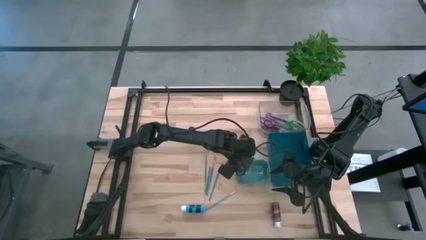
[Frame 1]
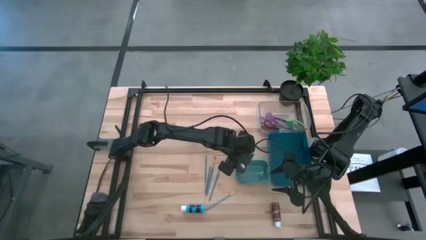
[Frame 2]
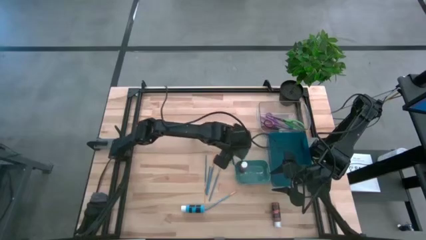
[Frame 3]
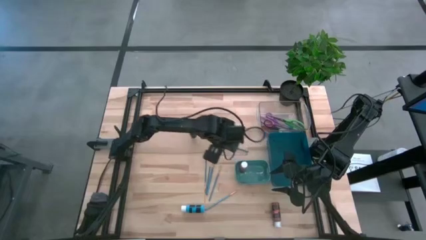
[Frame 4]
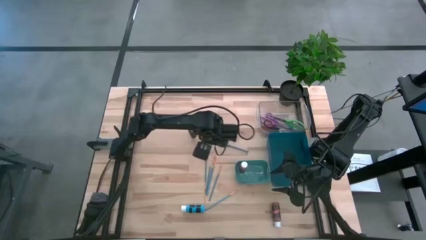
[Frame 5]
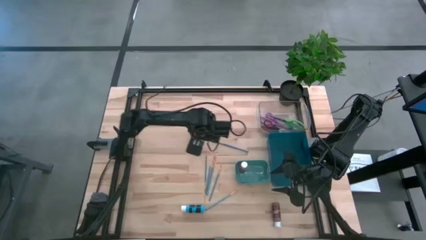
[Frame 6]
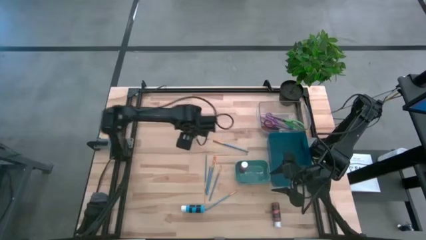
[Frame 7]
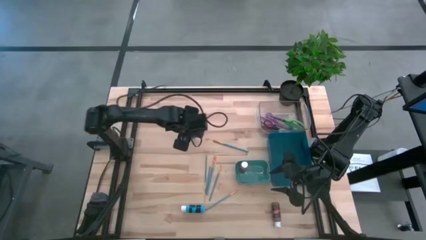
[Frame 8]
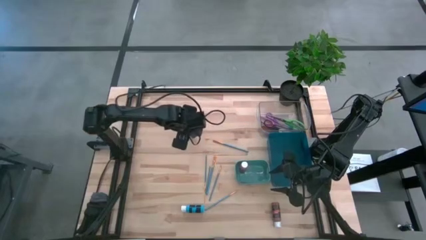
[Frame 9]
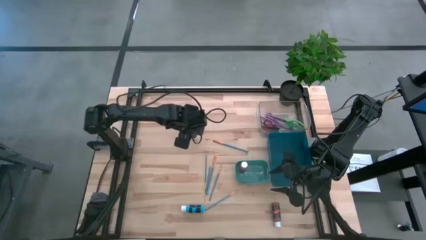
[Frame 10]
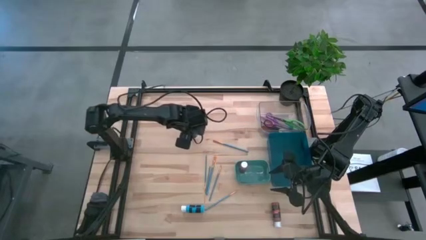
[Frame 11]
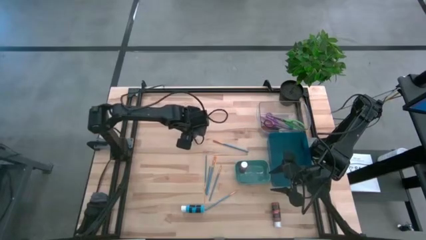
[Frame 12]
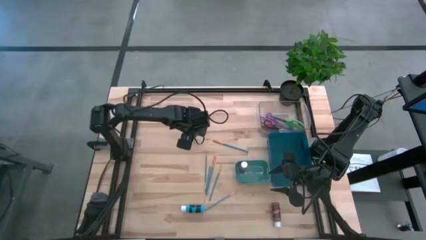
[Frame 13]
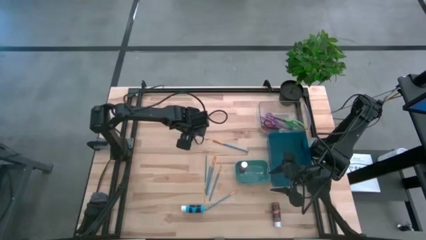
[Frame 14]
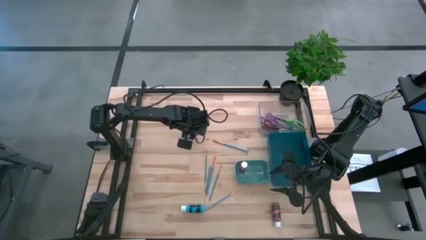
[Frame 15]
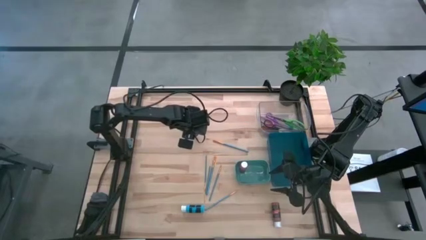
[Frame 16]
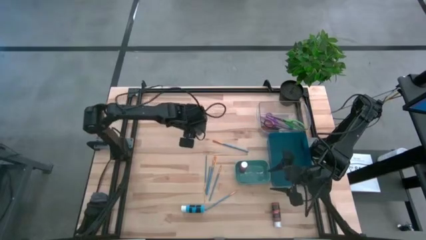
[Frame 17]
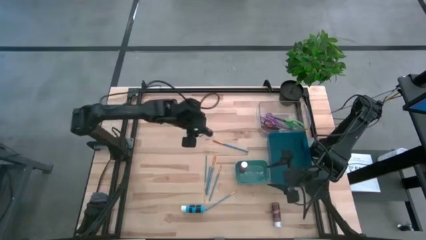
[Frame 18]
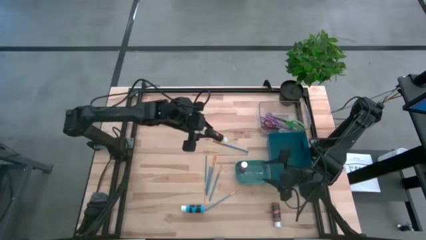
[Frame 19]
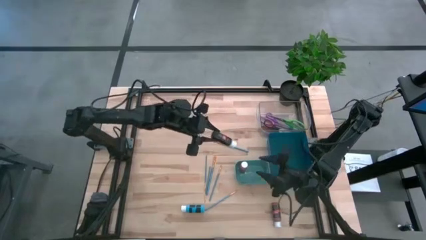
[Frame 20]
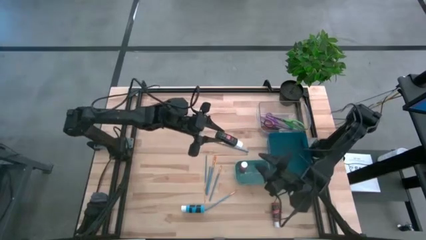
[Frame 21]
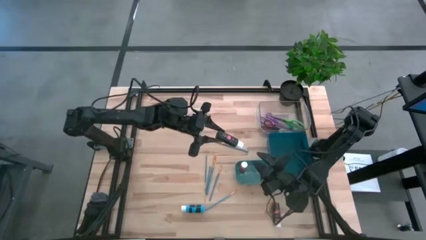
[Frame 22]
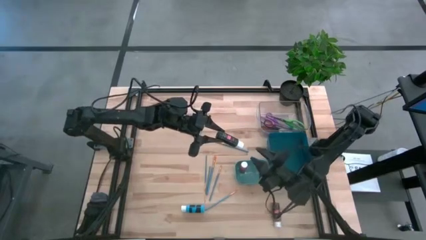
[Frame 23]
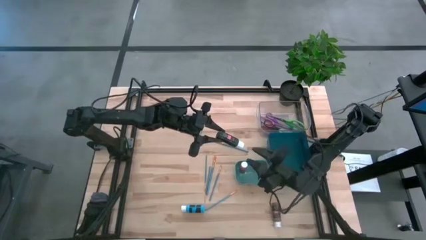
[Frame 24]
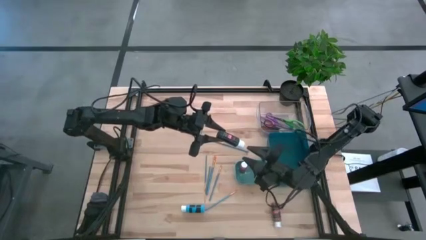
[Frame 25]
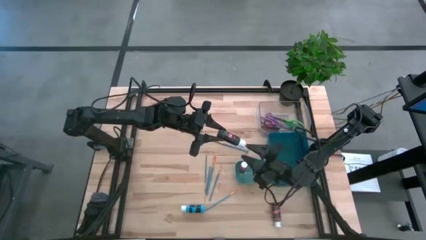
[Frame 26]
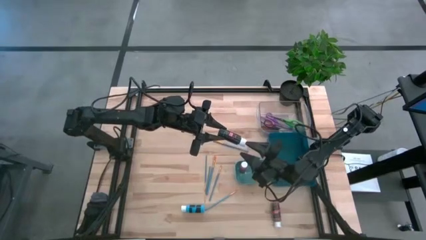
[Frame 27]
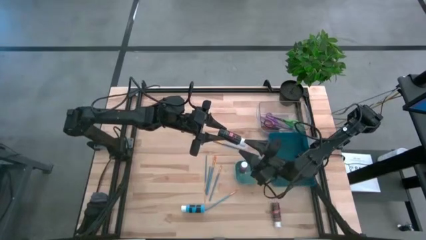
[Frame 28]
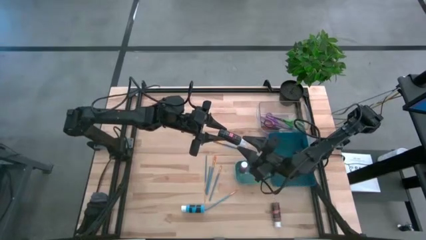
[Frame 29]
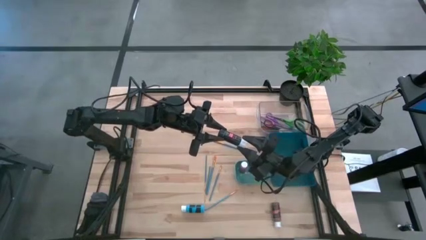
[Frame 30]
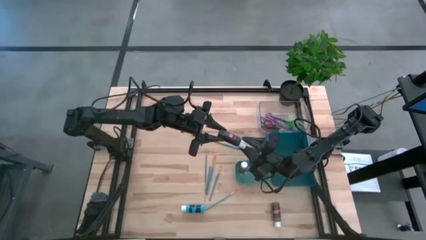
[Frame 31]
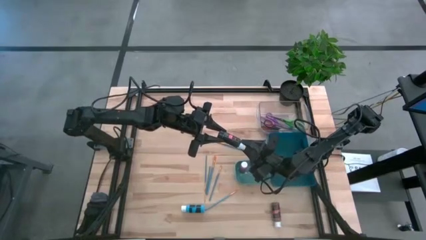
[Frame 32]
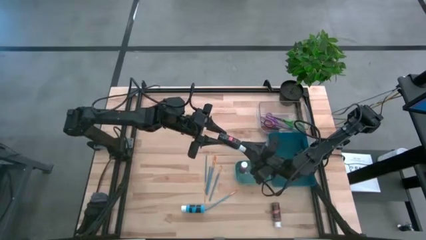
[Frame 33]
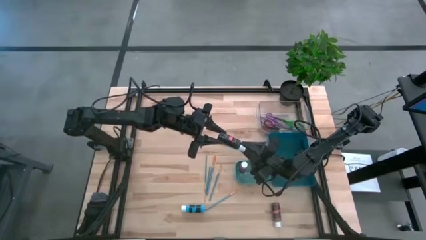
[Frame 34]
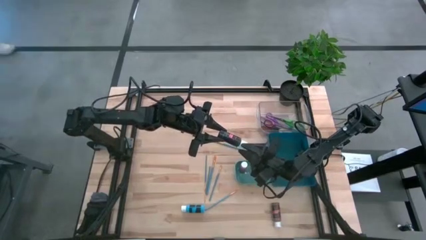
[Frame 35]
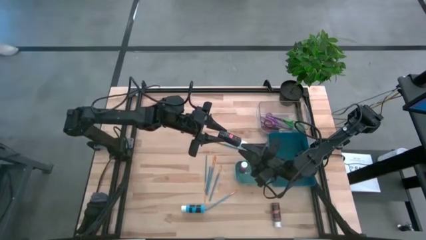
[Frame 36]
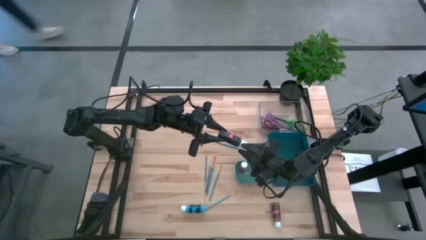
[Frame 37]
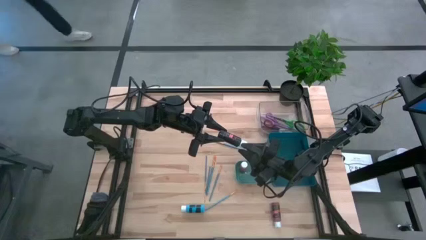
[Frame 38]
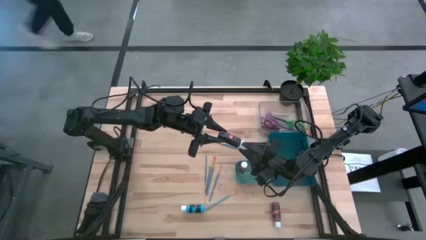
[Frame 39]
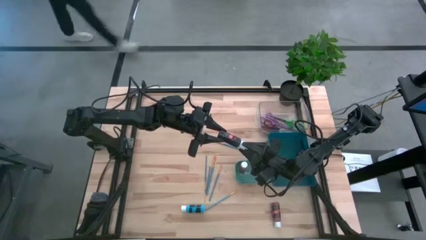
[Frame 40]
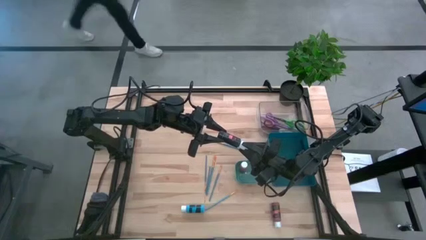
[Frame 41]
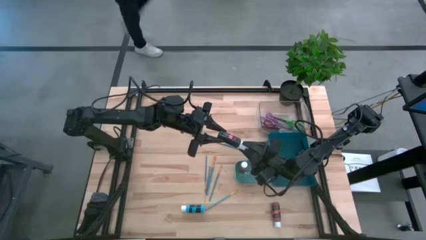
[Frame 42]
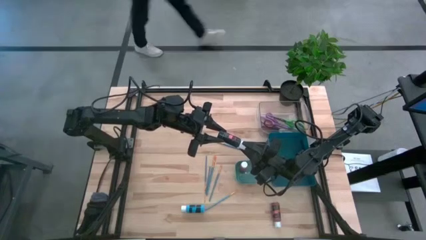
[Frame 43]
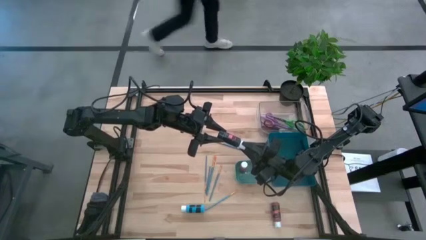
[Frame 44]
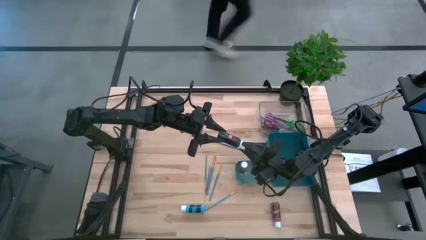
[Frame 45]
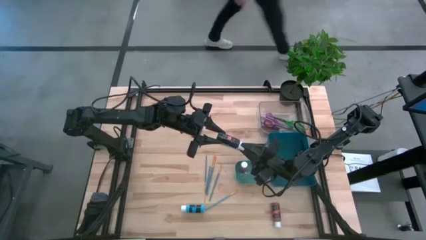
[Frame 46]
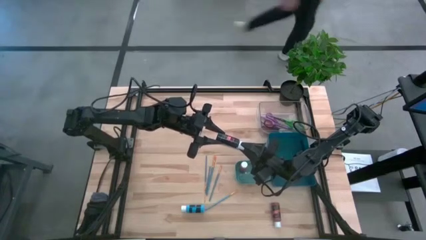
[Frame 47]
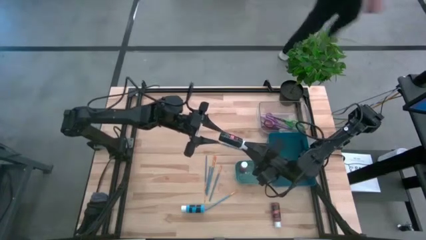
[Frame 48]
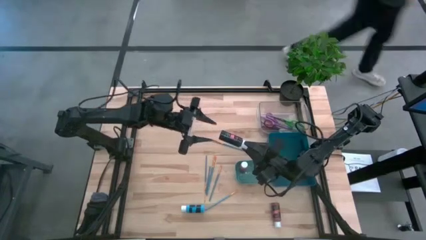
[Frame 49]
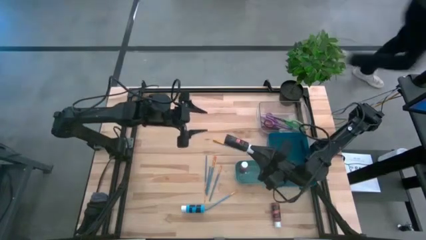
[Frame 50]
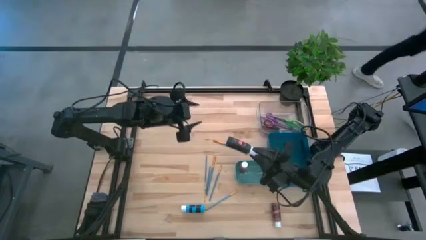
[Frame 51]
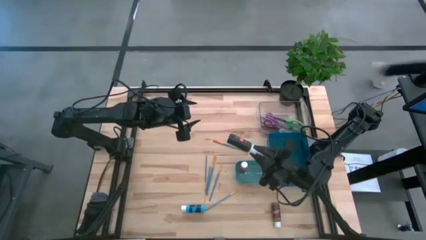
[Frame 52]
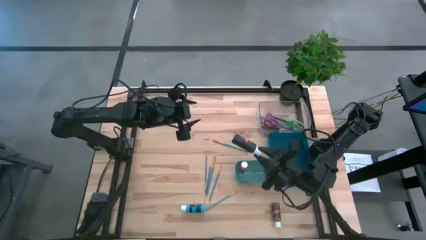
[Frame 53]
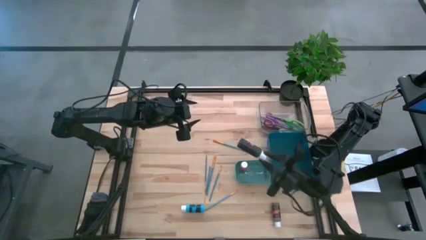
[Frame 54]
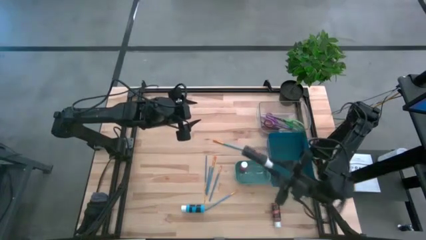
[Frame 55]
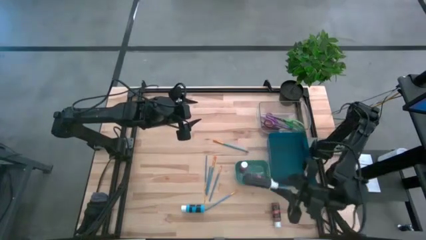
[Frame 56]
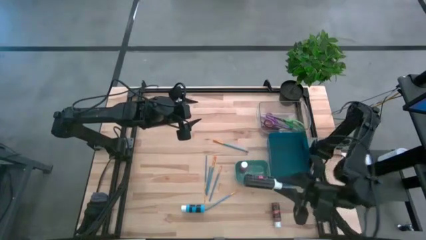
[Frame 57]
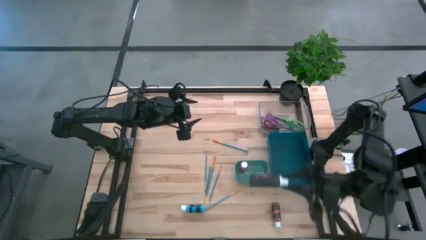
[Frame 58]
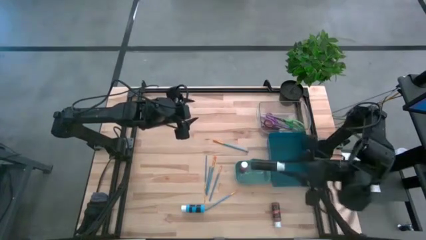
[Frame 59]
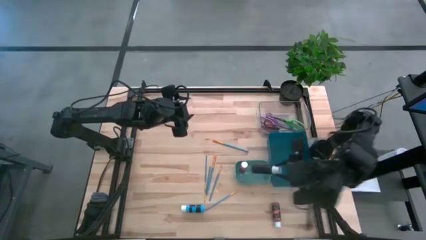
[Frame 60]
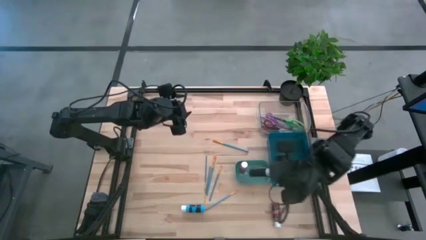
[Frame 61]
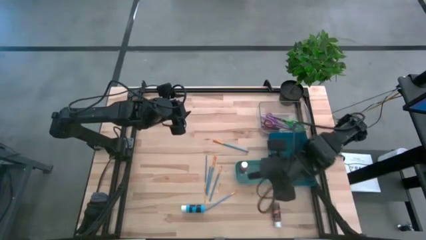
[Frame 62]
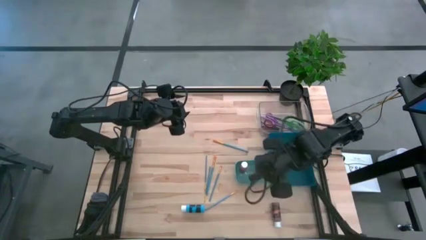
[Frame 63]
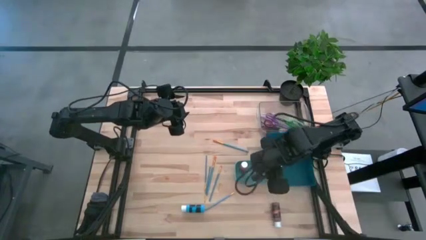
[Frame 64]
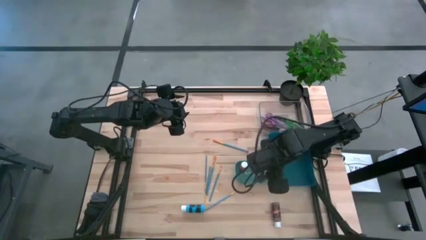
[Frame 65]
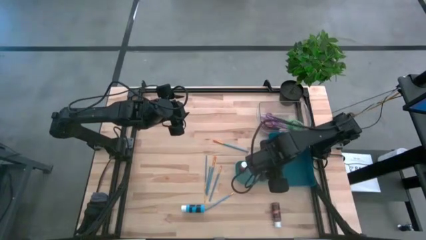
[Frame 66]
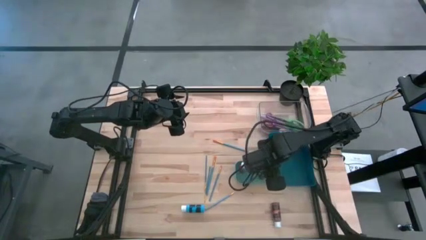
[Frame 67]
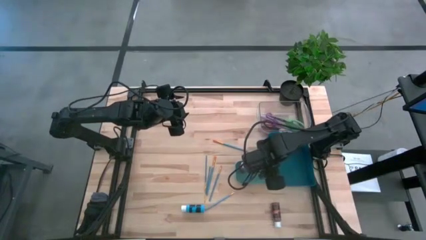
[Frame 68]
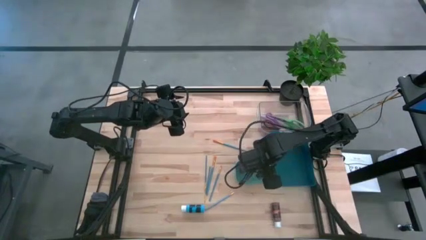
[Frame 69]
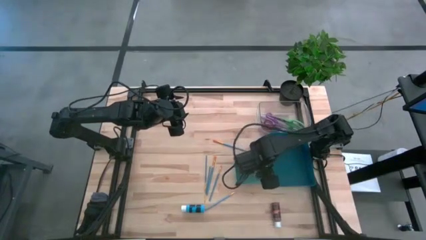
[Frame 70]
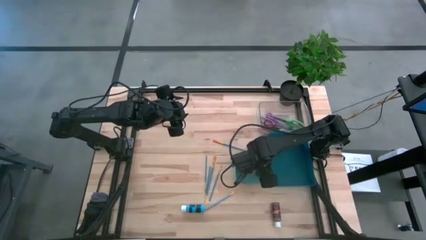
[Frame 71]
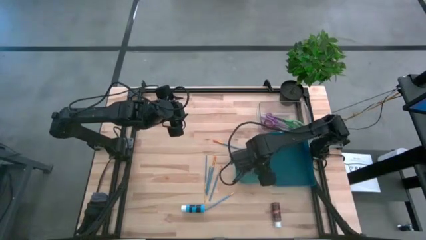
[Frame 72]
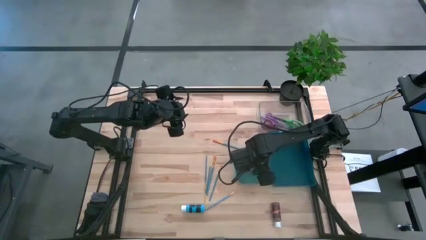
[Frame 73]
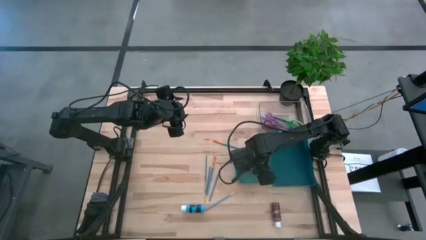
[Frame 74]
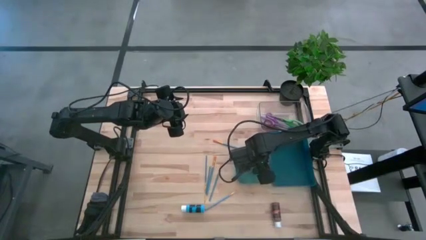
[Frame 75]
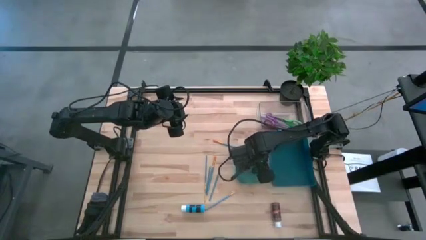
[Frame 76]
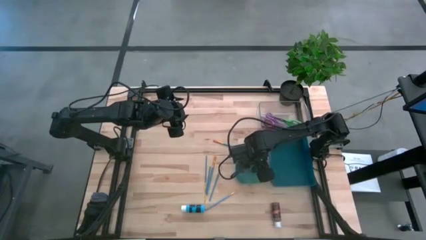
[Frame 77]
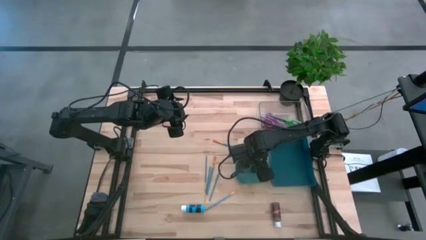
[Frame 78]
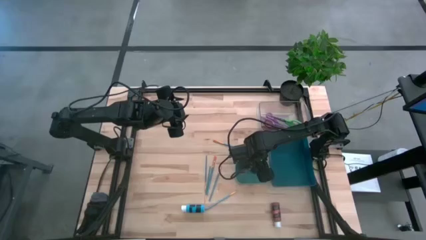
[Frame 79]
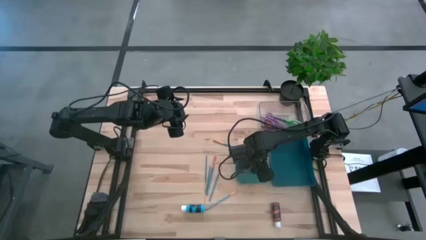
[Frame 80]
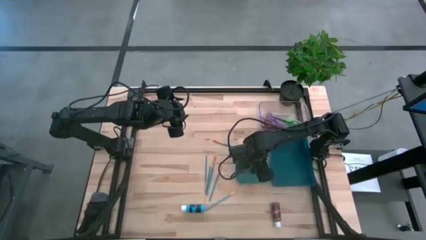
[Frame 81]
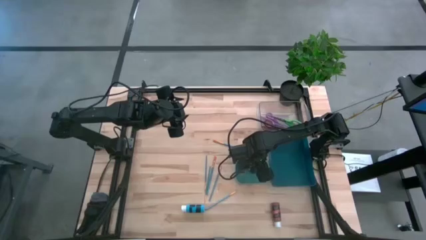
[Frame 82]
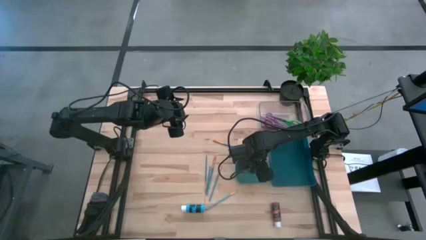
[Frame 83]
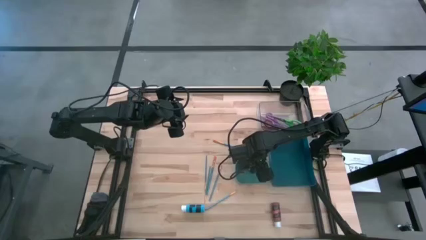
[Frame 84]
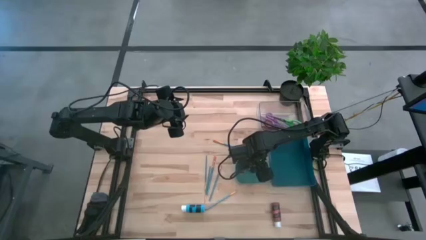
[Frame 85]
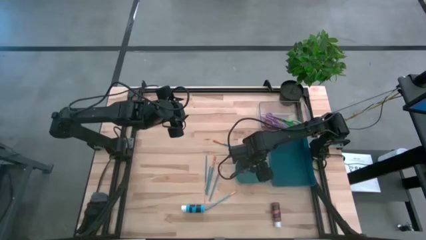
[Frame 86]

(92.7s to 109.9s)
Task: Pick & Place Paint Supplies
Put the black paint bottle into the green bin
